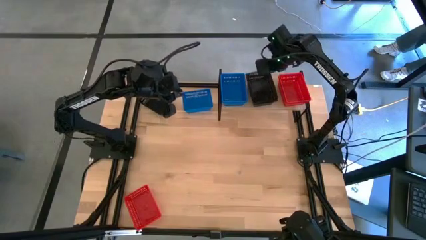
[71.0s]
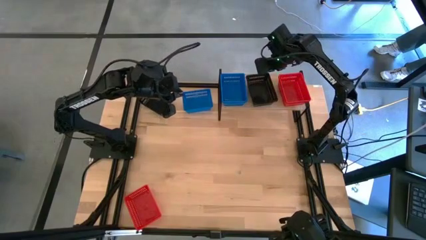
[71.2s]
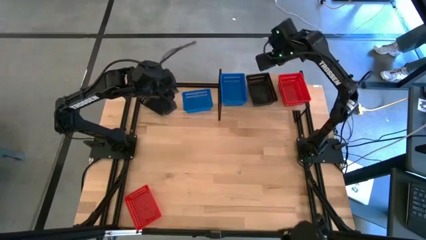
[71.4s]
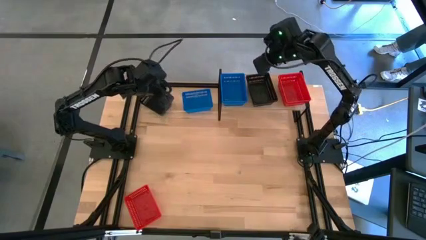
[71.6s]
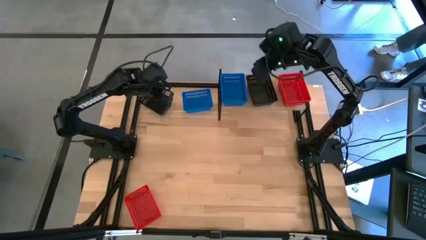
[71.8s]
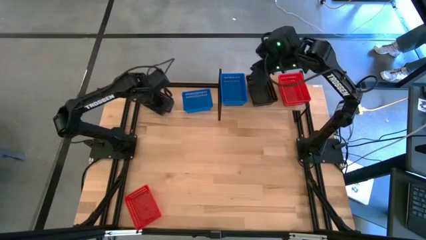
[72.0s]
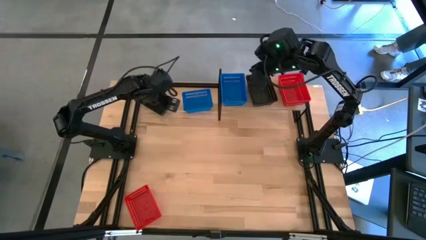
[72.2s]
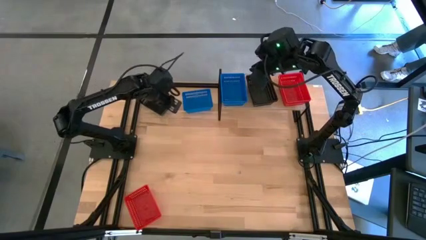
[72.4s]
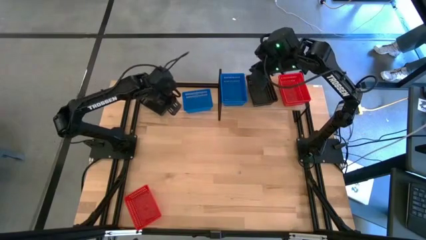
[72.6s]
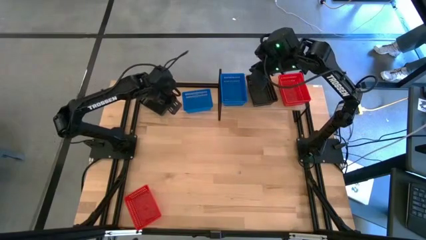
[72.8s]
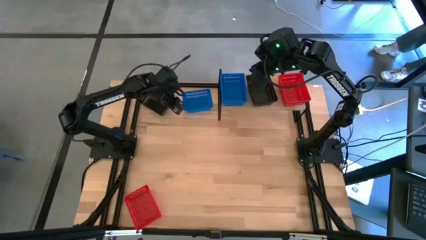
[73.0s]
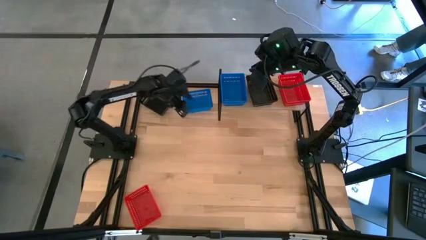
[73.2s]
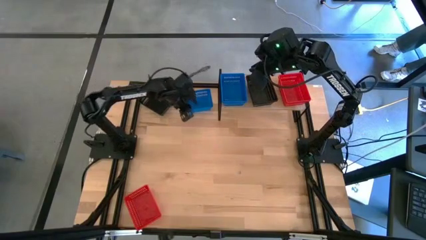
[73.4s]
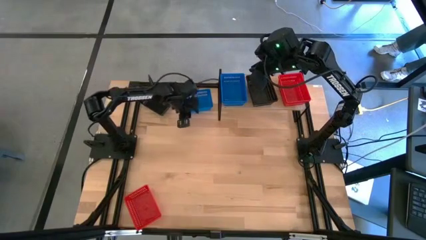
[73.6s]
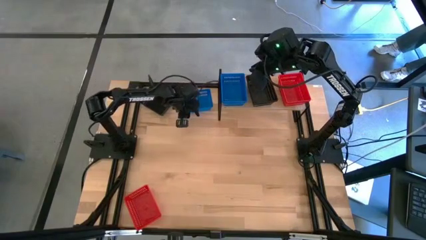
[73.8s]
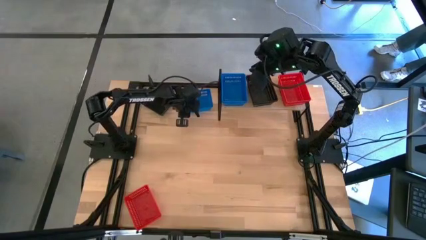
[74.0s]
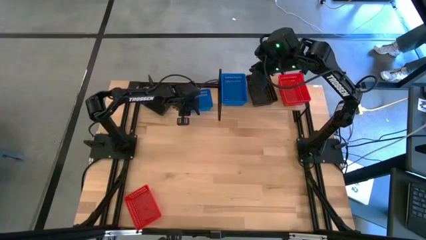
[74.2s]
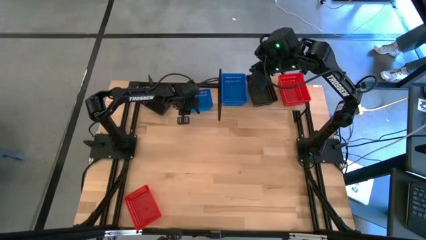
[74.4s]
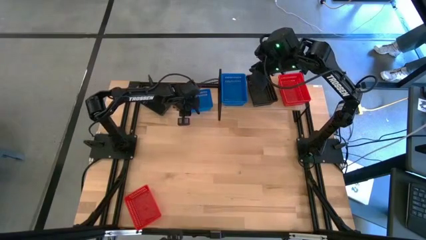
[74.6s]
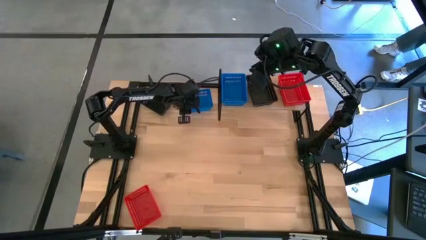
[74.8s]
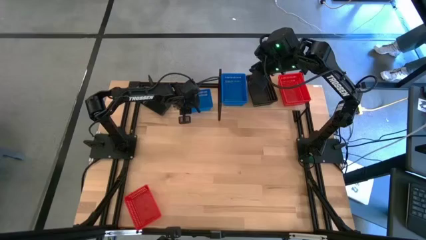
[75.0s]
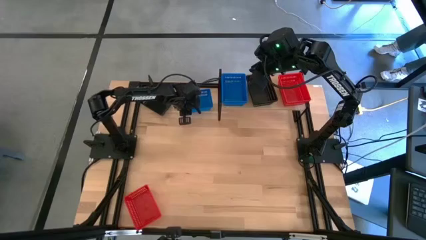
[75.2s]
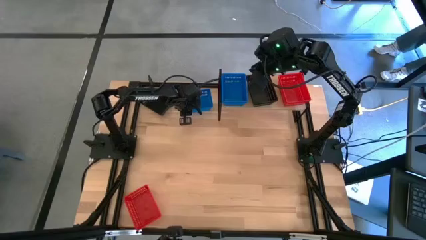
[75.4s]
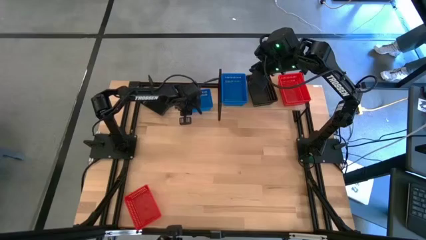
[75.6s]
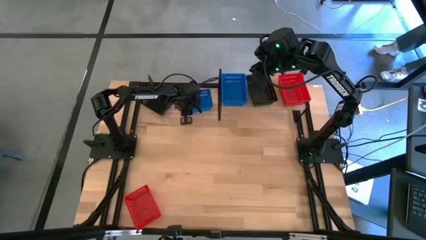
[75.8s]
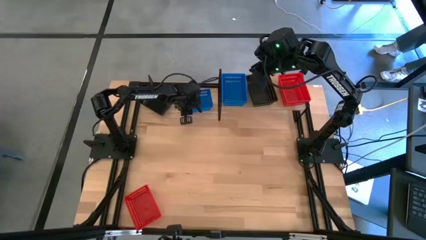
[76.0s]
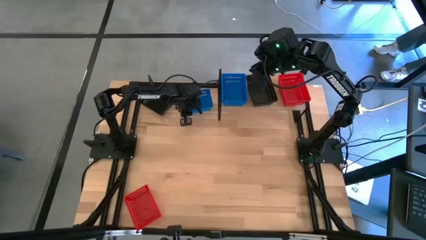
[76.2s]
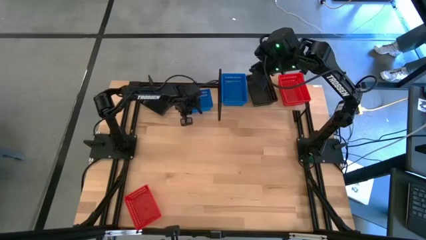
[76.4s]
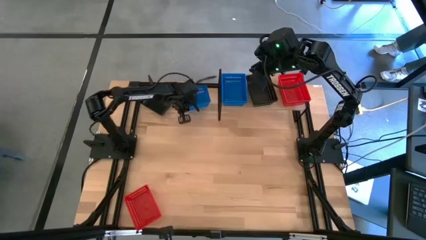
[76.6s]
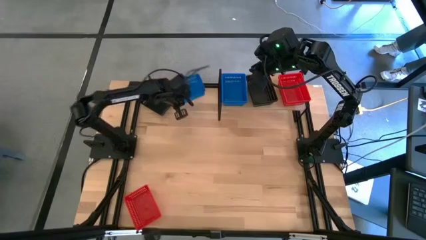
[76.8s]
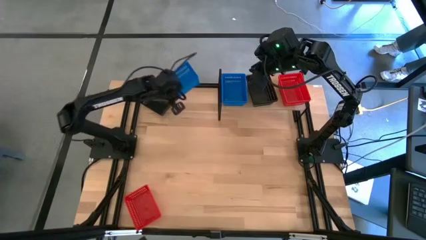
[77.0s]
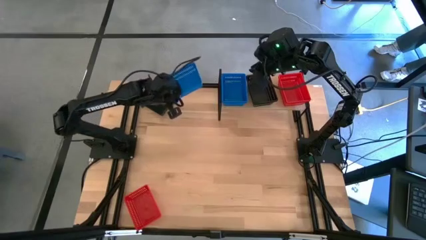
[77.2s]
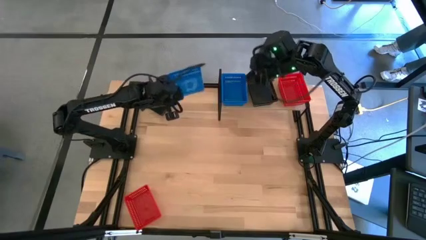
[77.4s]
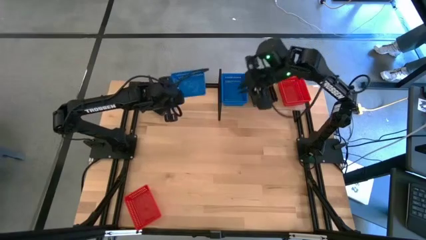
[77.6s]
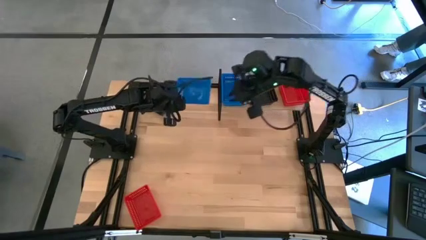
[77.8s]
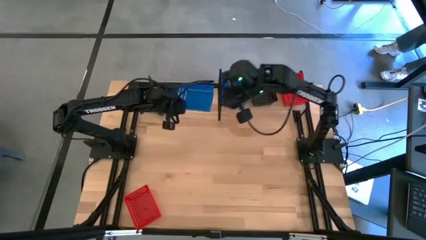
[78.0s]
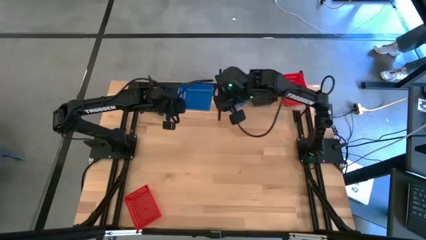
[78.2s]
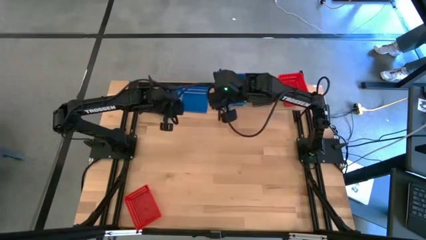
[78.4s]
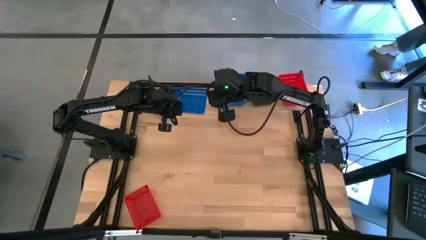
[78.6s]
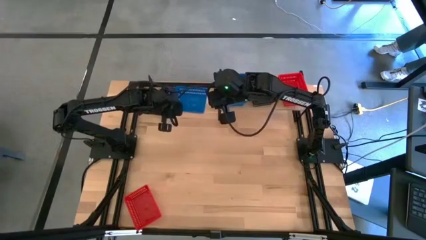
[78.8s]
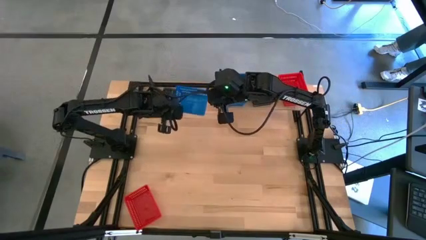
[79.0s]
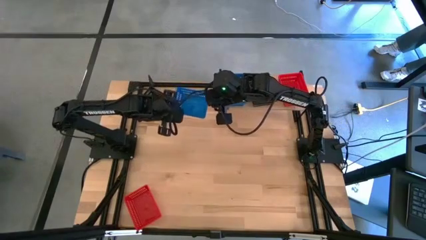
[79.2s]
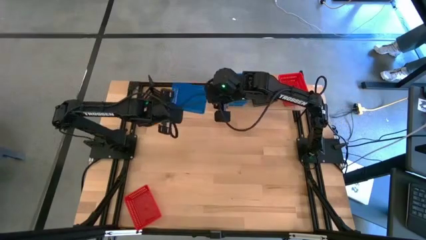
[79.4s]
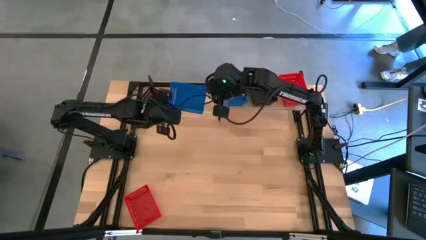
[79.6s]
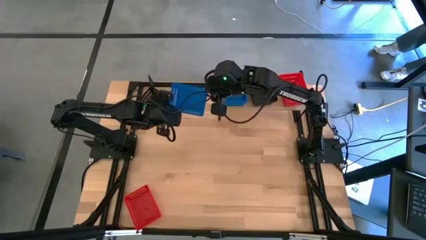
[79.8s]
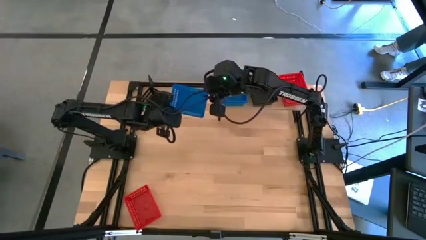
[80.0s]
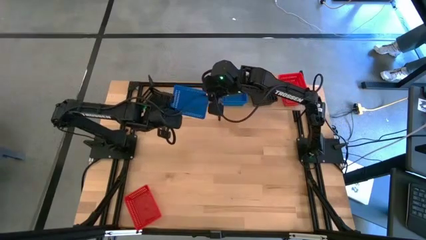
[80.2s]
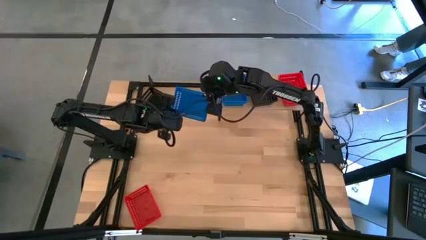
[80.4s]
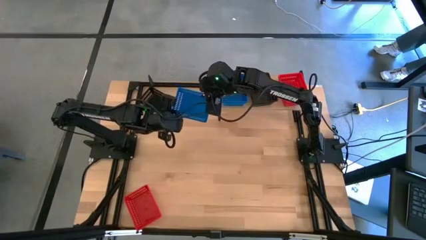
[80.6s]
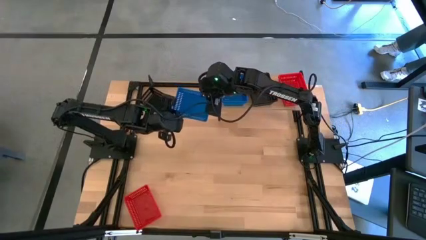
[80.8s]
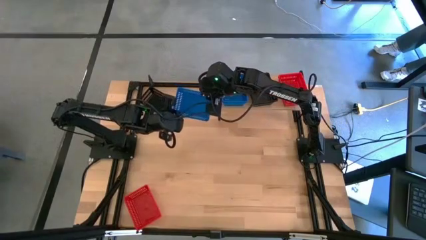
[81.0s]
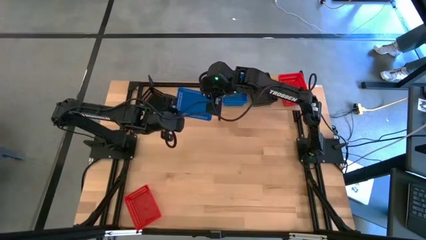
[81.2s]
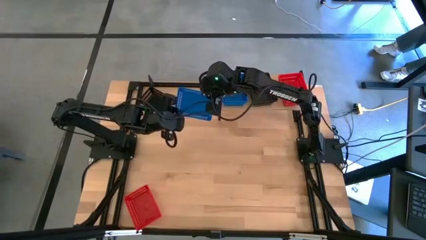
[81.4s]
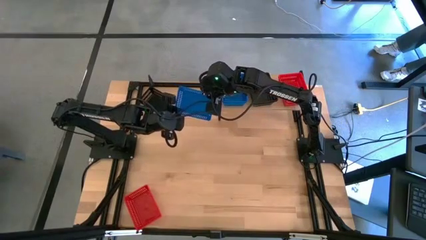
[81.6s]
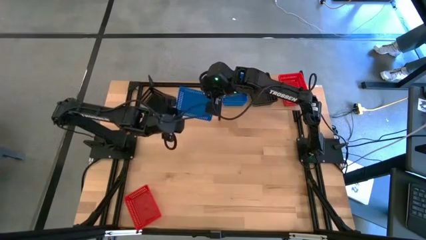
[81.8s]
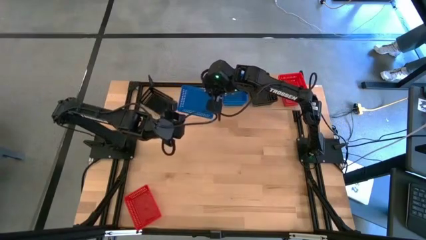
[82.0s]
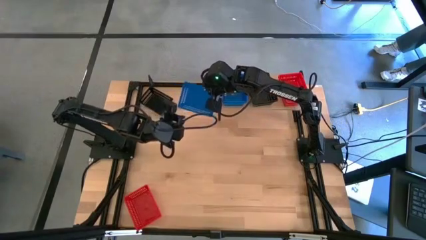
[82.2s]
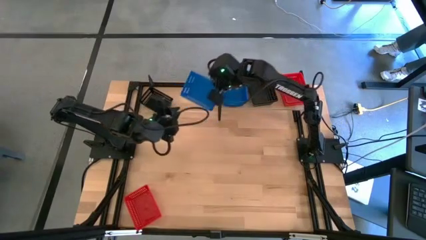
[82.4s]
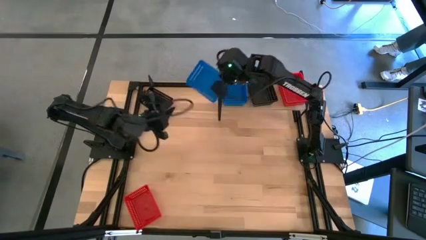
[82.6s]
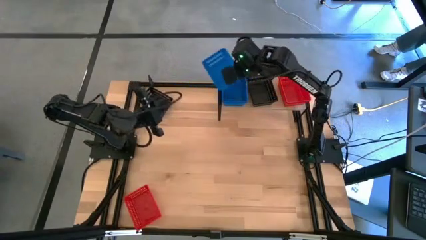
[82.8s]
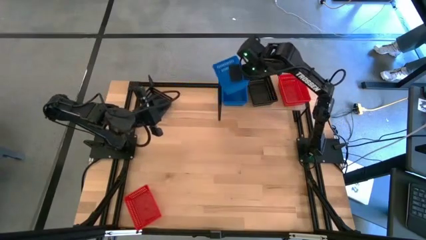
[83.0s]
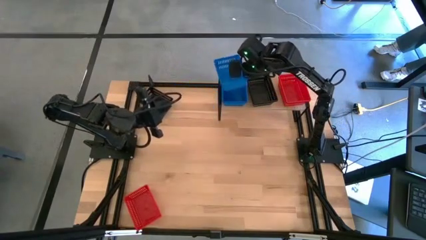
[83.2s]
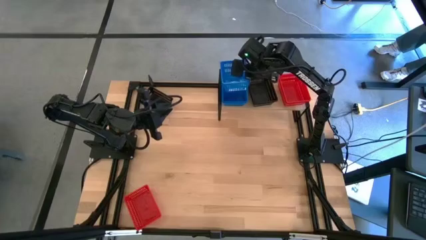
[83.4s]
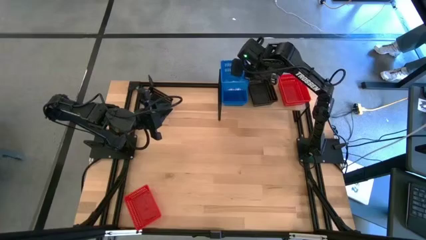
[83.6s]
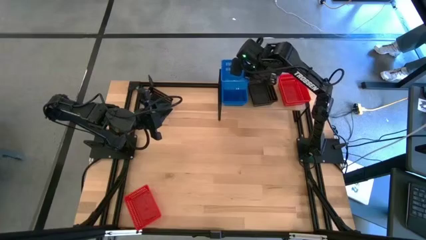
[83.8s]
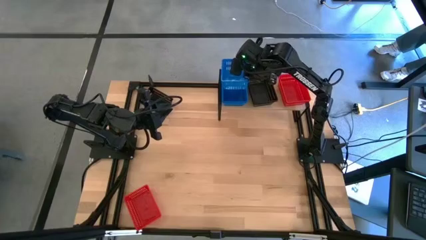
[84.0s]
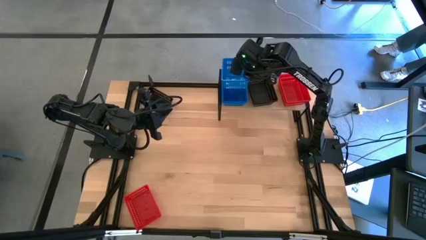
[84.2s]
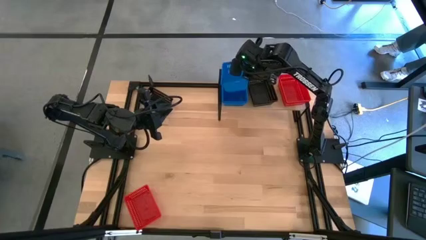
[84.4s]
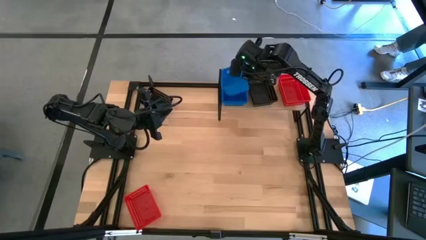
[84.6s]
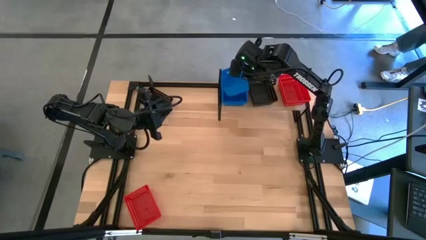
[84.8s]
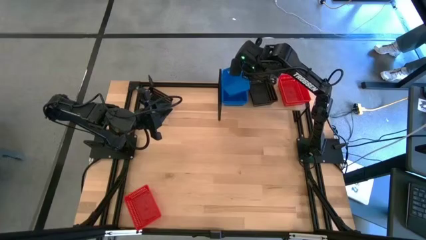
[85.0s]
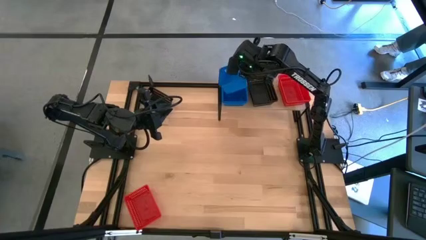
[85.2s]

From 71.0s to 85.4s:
Task: Stack baskets on shelf by color
Stack the blue bin on the blue bin on the shelf

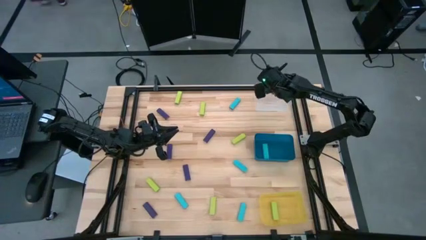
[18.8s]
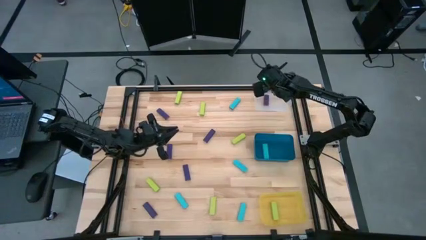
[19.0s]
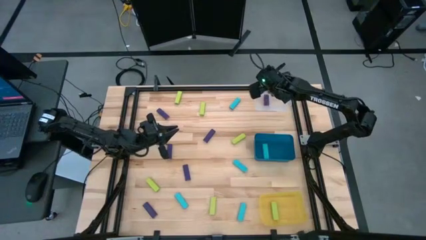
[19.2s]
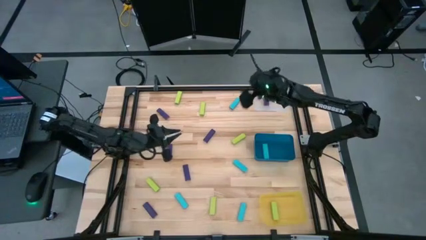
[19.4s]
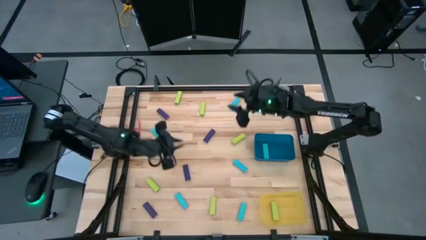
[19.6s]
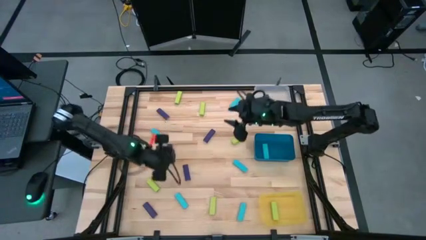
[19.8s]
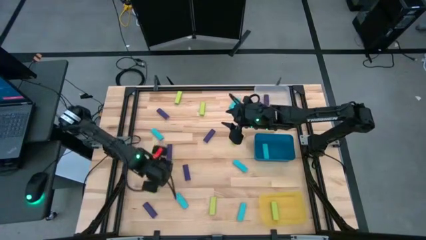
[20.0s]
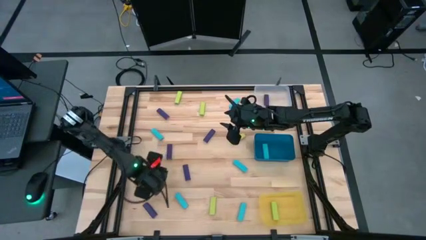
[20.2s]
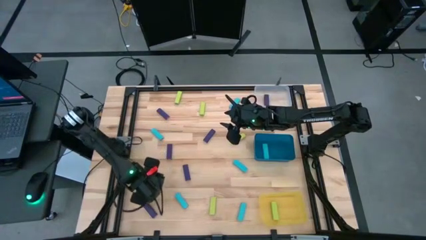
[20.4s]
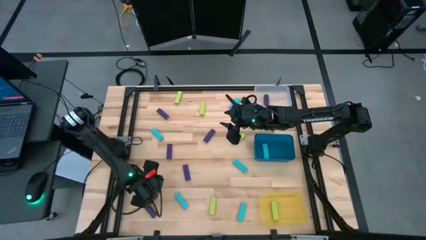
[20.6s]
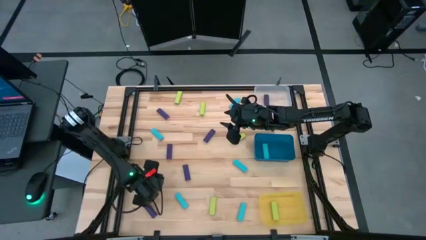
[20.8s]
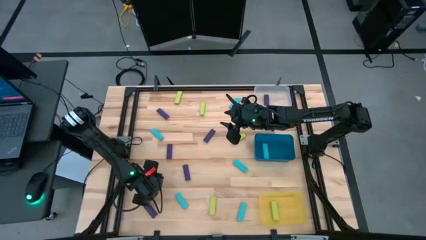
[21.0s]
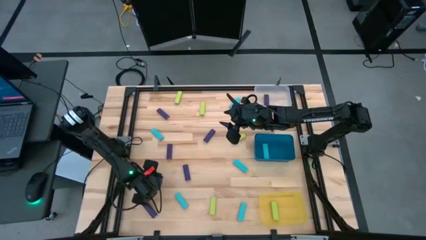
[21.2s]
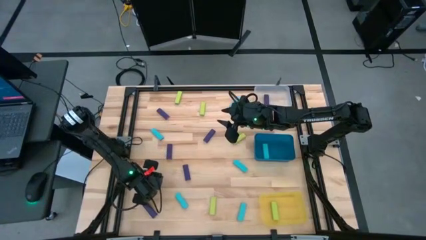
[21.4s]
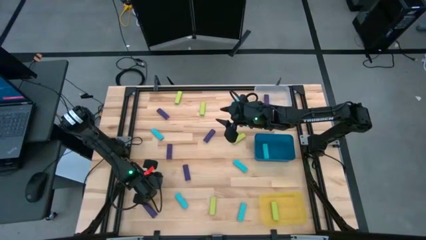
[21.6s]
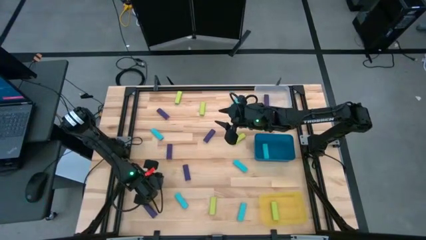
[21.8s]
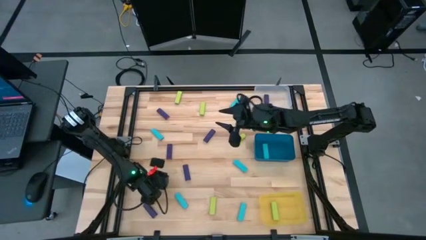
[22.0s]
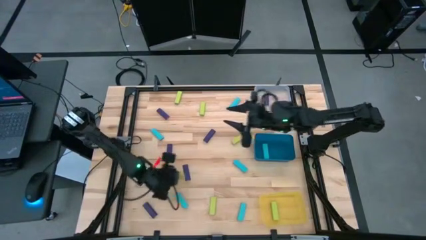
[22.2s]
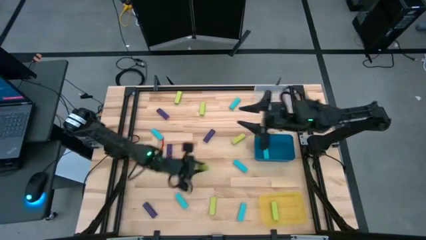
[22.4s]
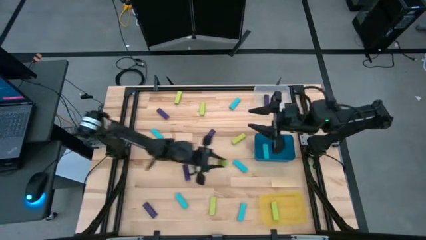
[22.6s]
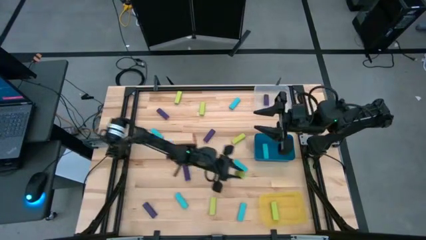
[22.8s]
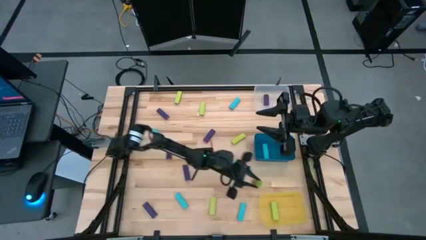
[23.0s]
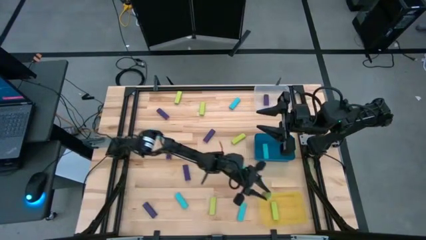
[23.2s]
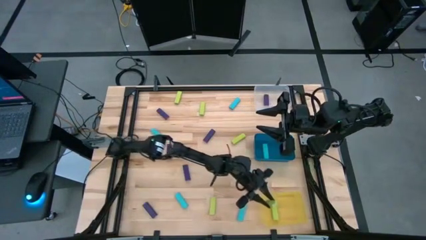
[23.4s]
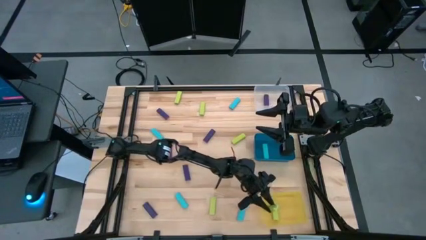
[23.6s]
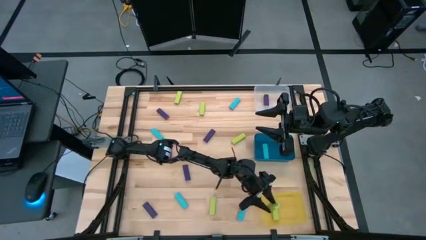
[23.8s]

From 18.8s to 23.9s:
Task: Sort blocks
Put the light green block into the yellow bin
